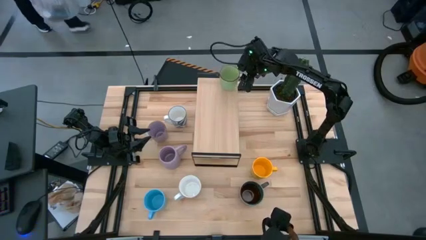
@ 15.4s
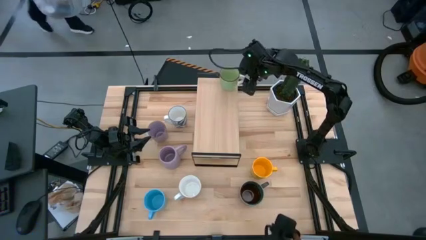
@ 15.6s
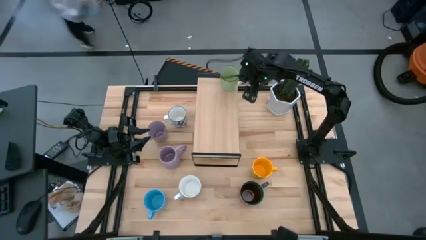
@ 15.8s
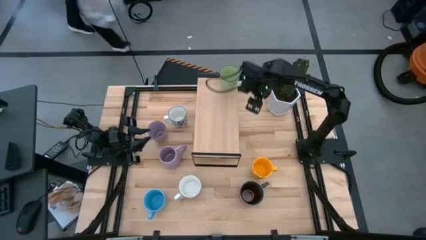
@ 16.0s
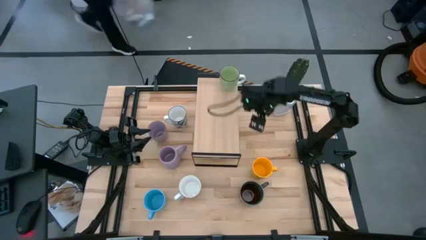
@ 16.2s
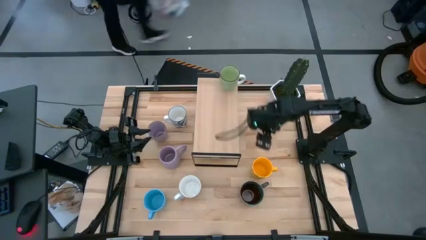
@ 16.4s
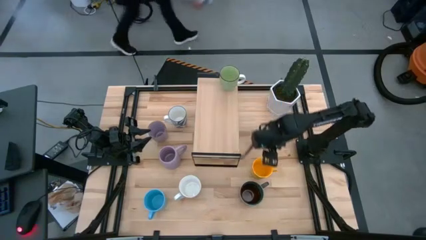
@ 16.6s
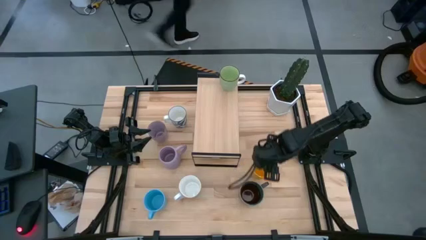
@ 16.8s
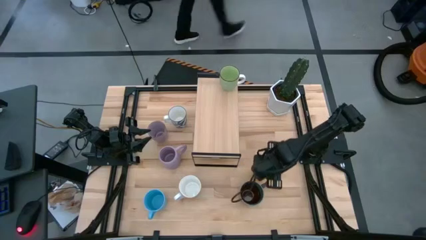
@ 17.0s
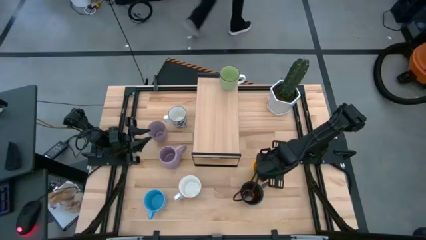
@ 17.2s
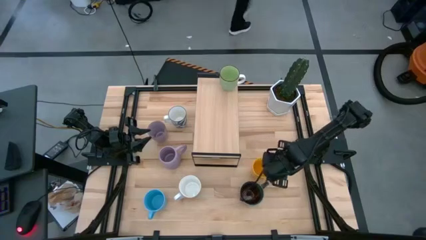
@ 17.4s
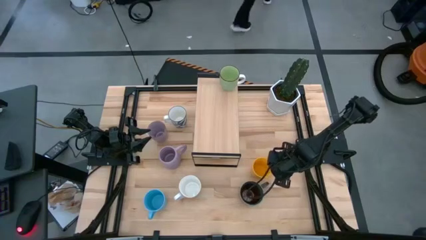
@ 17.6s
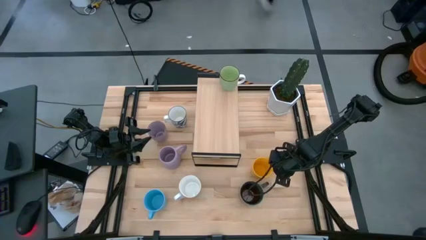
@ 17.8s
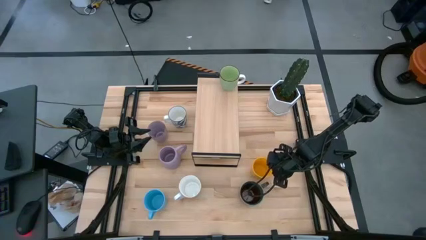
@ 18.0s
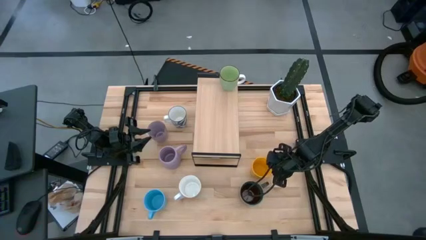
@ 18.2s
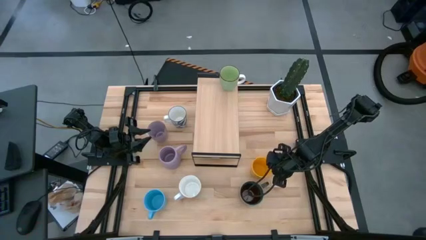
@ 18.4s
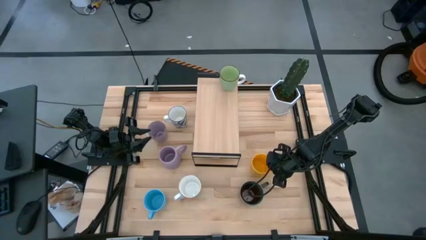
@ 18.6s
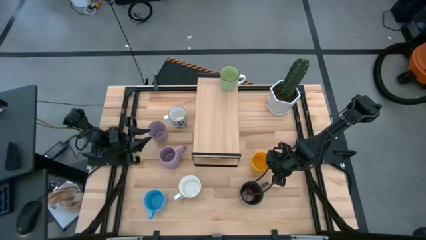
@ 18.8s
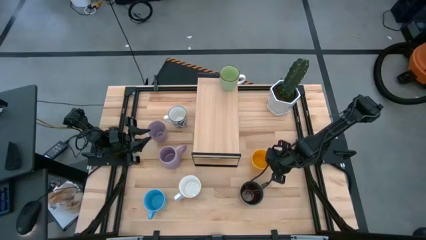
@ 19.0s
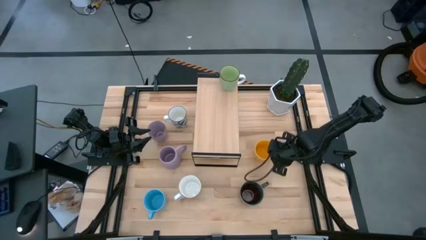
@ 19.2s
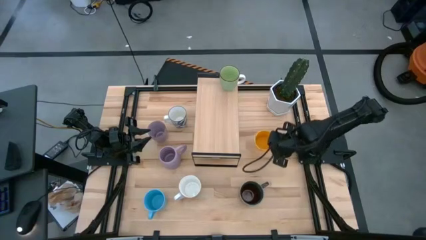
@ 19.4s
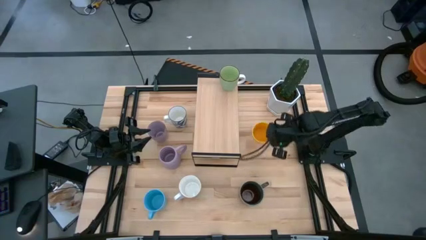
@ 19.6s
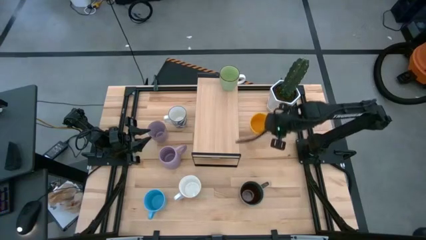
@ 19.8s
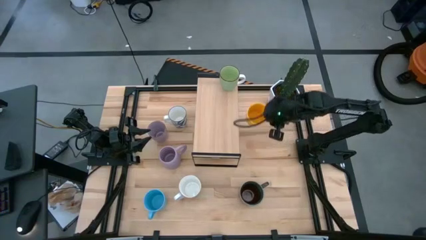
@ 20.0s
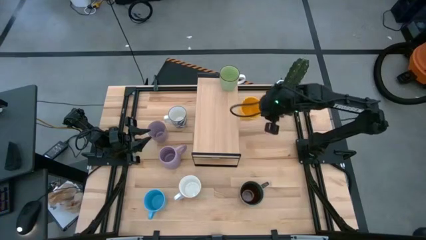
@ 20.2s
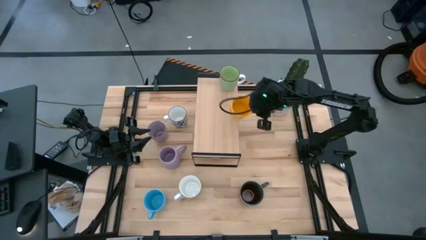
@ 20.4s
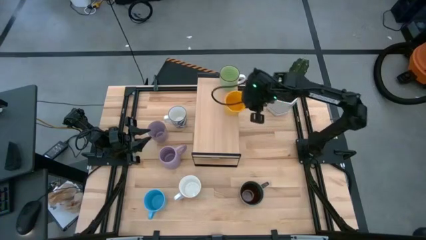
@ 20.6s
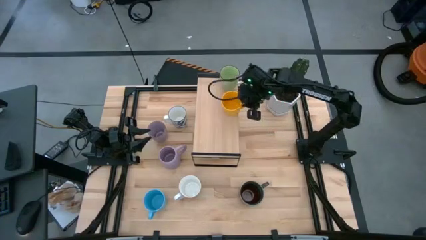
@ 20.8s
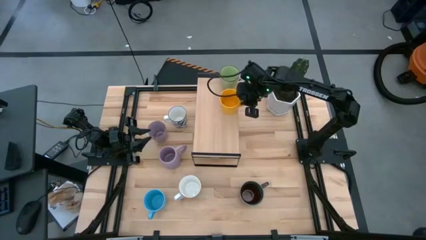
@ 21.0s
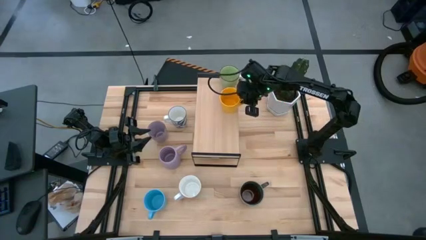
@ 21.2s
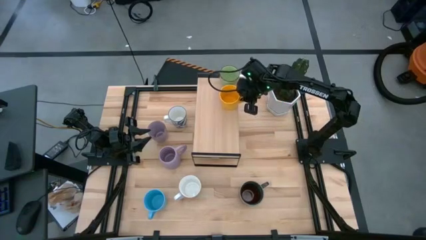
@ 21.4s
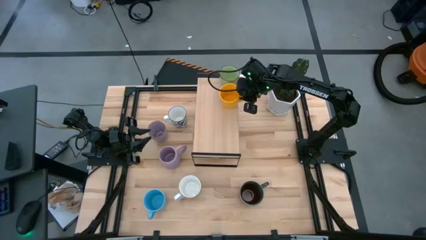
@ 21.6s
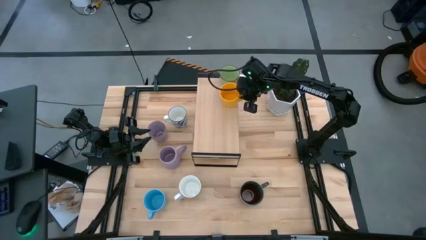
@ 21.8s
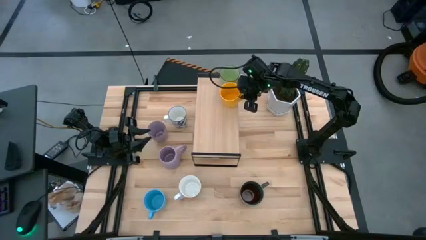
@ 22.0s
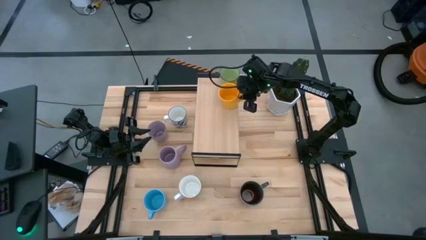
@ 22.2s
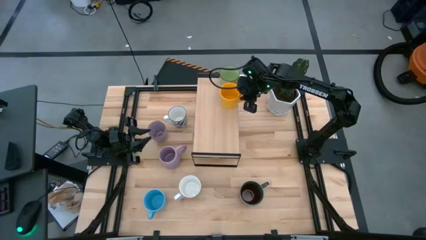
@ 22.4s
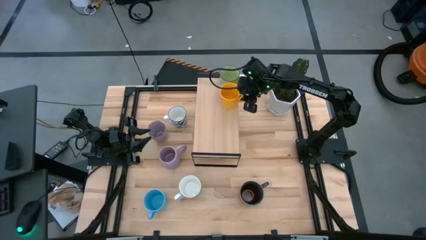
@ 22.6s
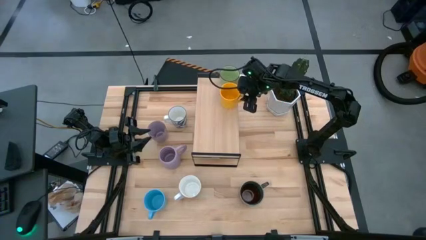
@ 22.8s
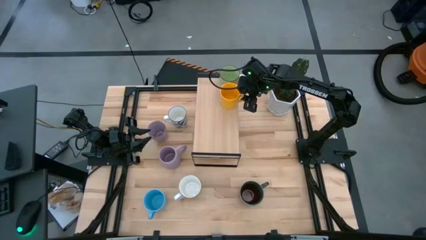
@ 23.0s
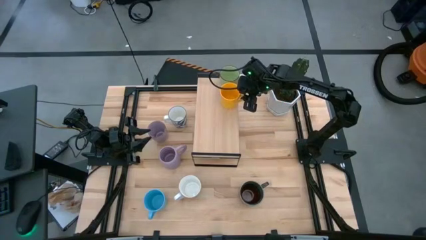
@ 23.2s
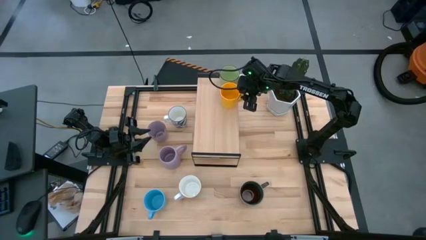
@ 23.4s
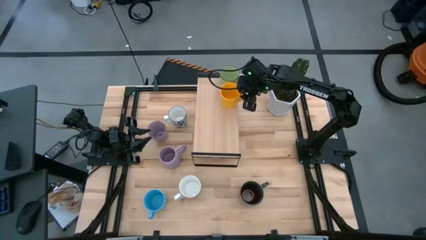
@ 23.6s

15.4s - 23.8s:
Task: Place coffee mugs
Put the yellow mug on the shelf

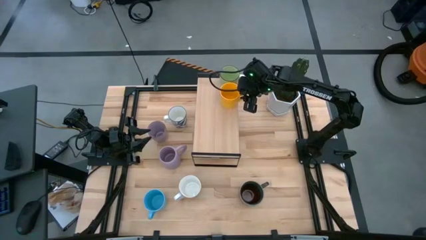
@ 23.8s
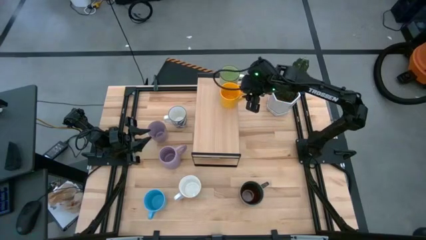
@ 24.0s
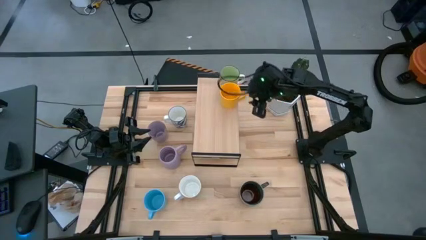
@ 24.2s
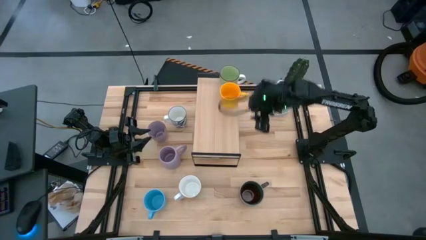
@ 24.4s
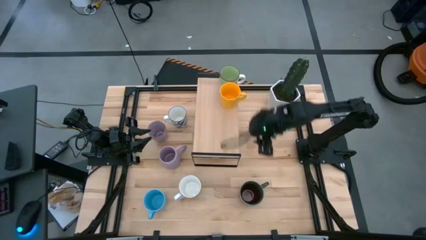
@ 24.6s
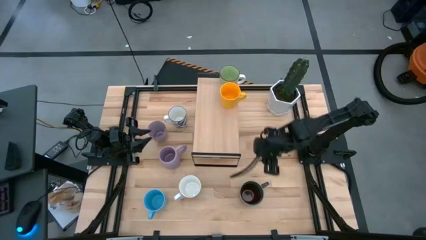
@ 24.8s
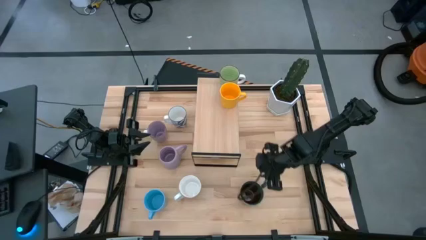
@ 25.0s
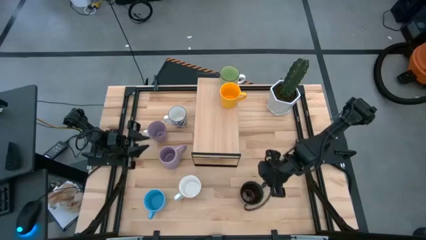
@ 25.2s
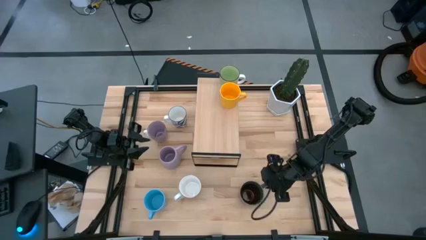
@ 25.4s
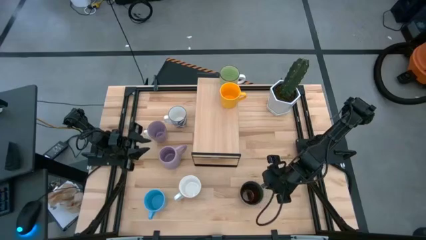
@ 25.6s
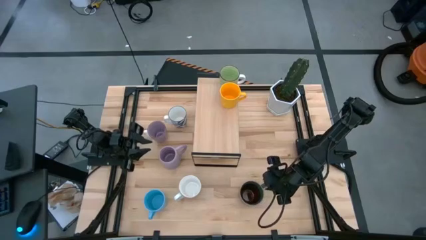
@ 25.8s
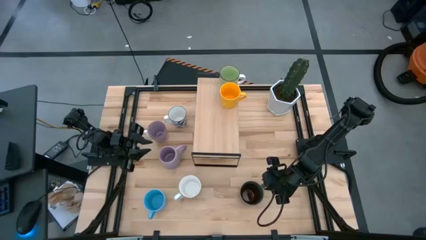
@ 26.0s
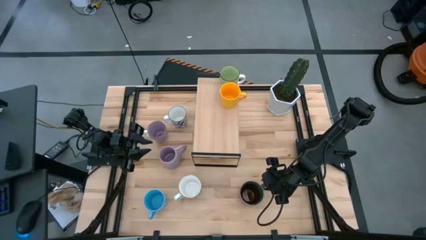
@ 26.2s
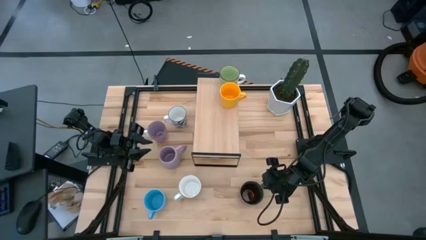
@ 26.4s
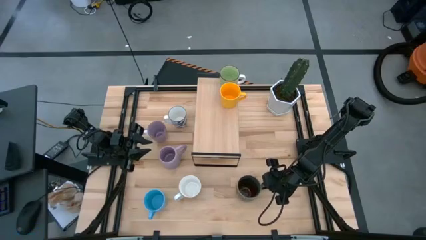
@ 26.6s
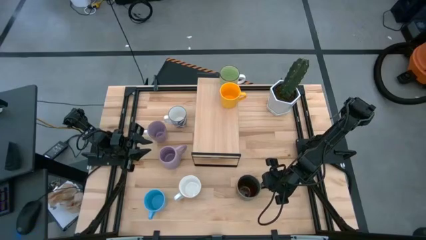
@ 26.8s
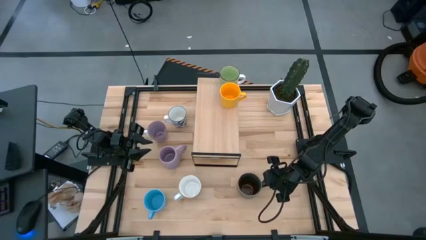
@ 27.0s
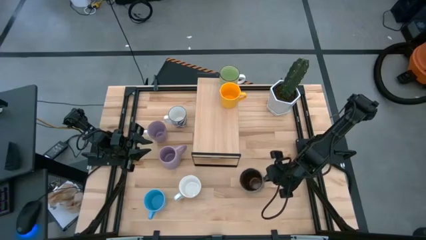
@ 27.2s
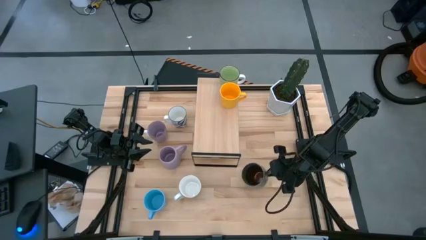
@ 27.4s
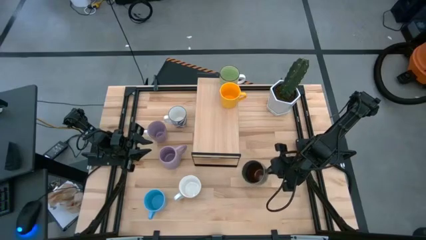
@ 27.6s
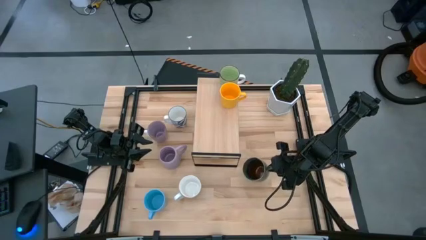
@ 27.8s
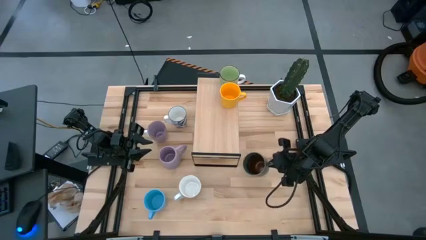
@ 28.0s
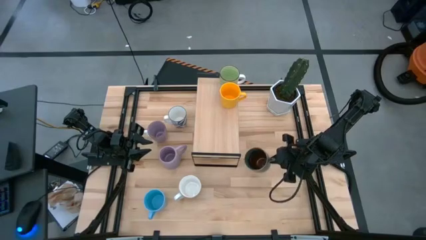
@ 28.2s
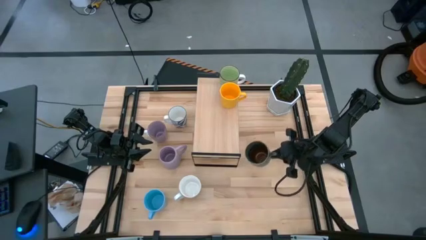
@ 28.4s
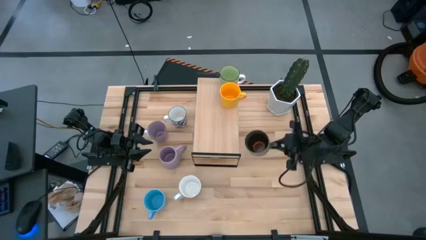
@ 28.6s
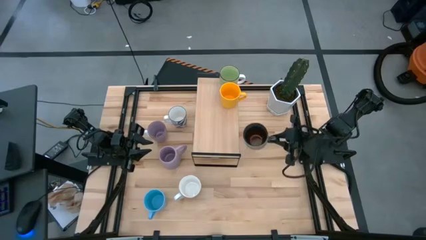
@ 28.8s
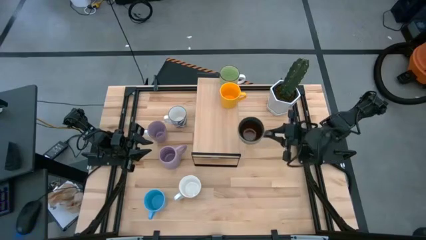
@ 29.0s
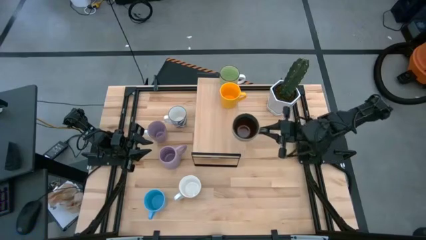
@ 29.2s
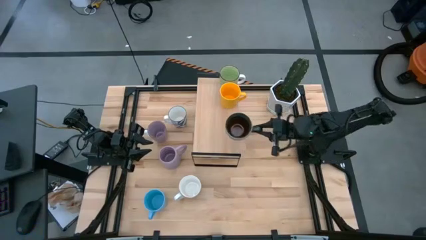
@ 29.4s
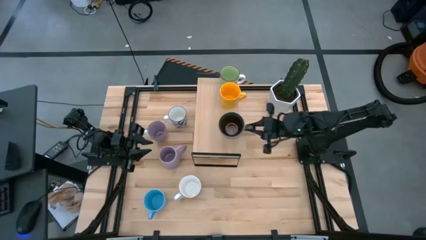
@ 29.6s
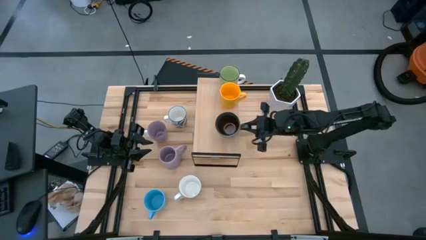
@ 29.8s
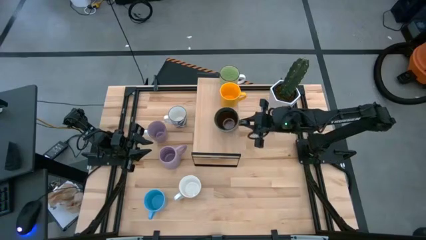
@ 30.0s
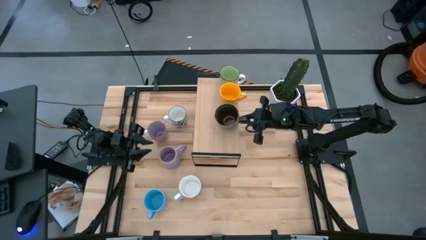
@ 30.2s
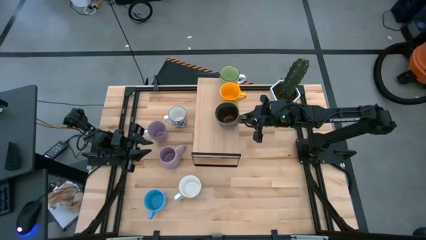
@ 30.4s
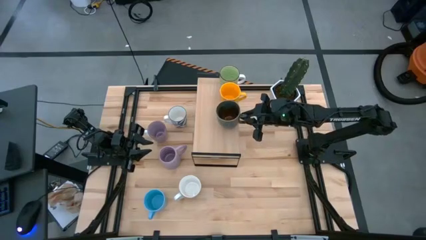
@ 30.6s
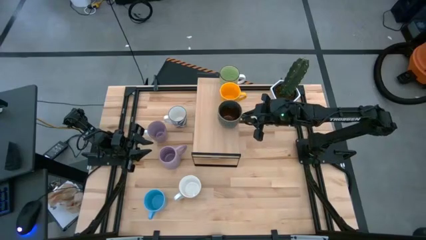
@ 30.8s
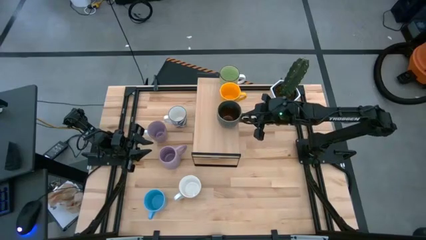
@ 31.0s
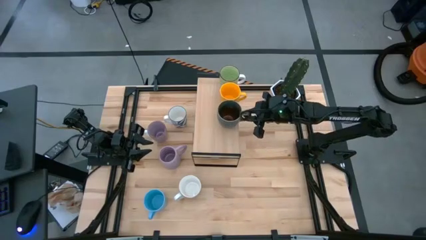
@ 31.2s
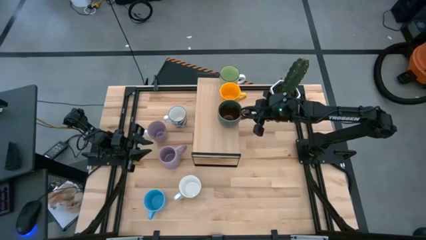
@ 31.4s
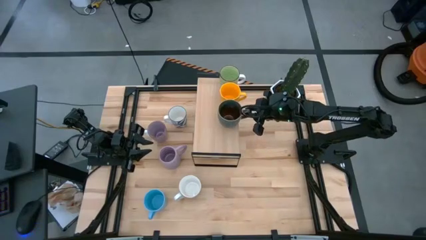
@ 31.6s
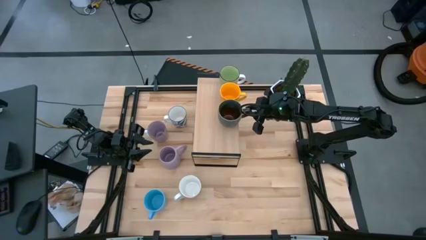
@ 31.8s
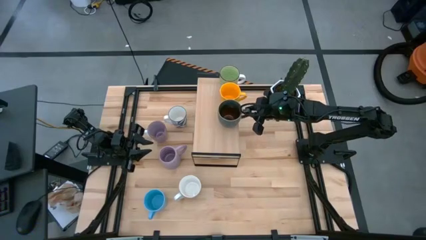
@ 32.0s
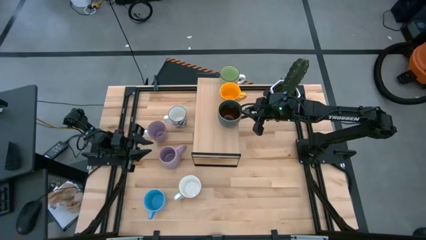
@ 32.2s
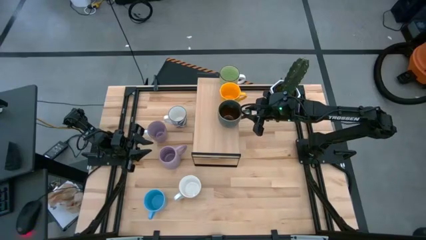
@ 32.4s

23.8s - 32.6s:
Put the dark green mug on the shelf
